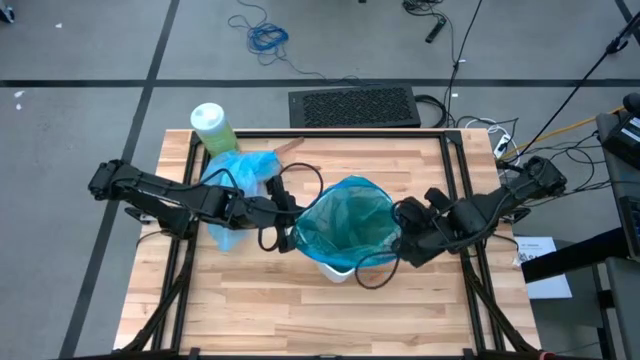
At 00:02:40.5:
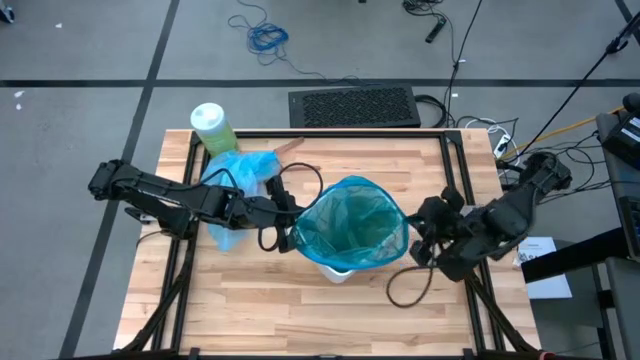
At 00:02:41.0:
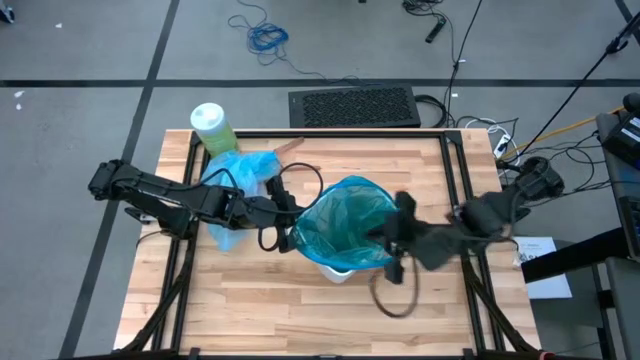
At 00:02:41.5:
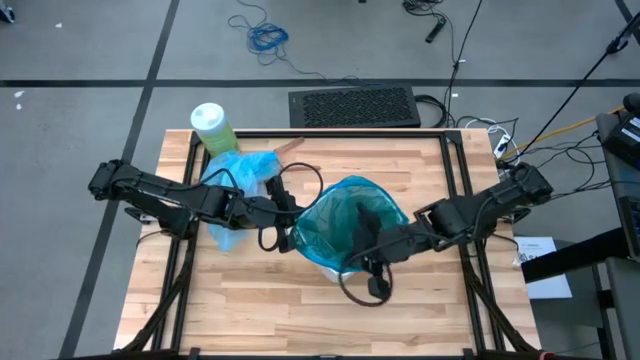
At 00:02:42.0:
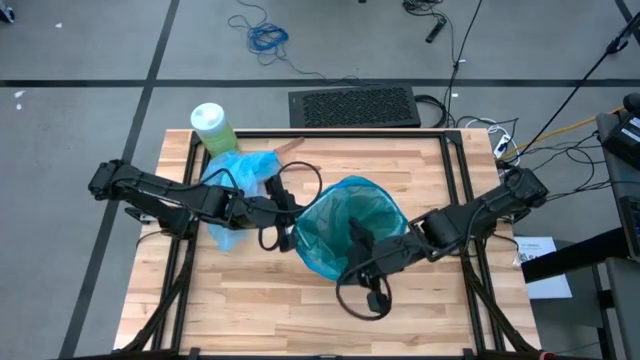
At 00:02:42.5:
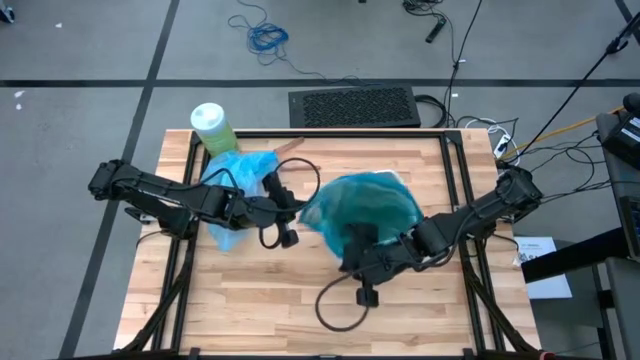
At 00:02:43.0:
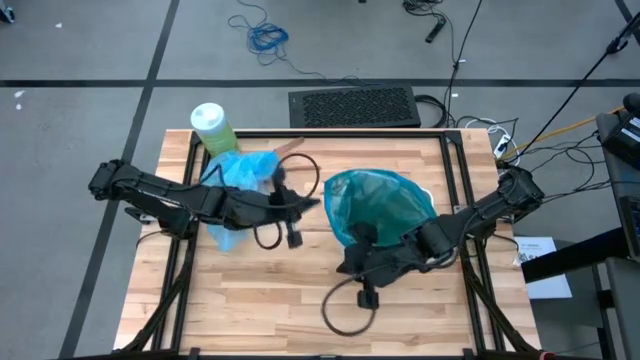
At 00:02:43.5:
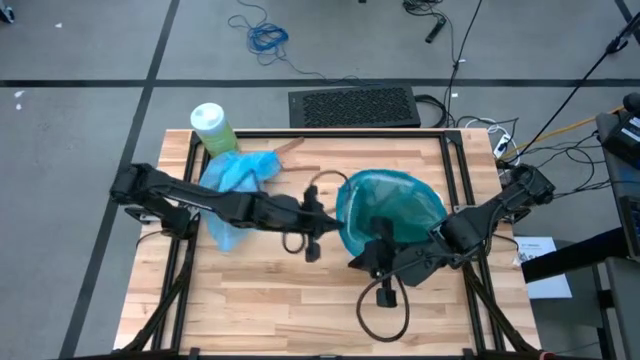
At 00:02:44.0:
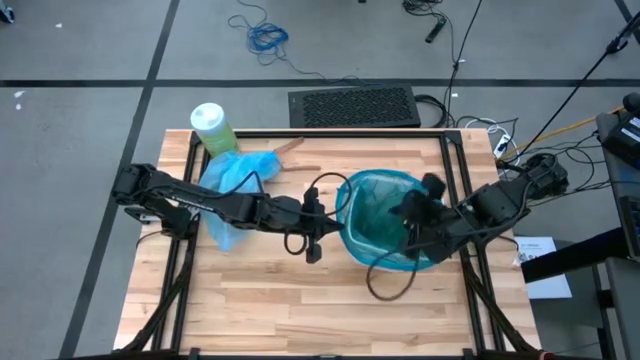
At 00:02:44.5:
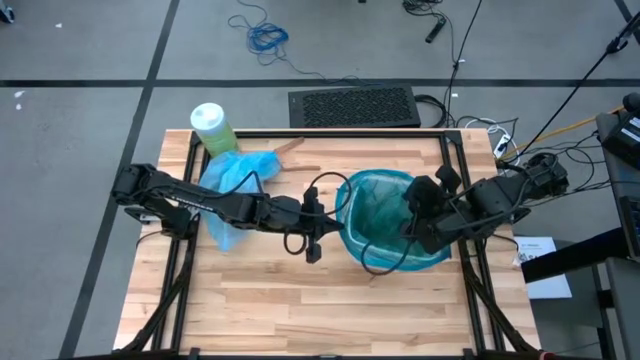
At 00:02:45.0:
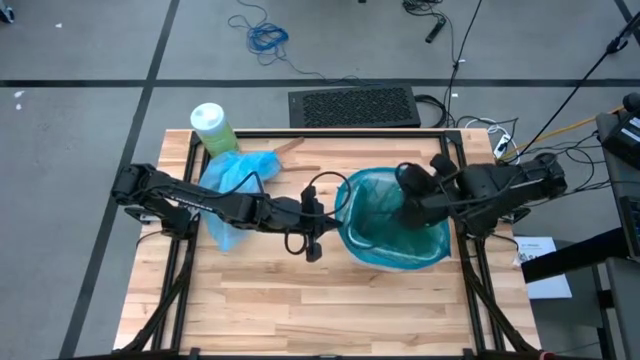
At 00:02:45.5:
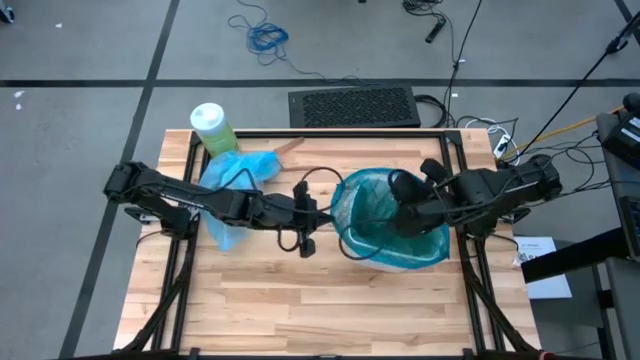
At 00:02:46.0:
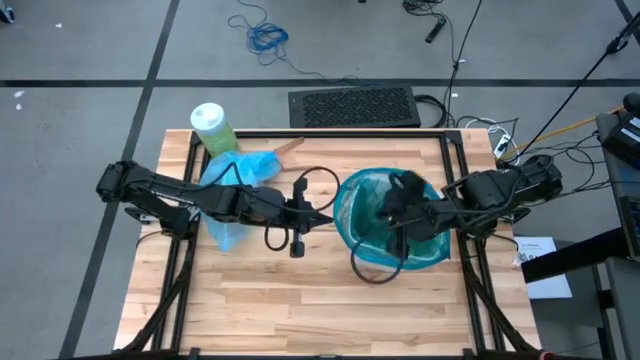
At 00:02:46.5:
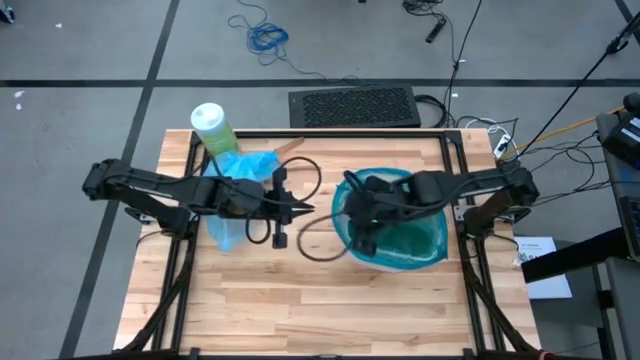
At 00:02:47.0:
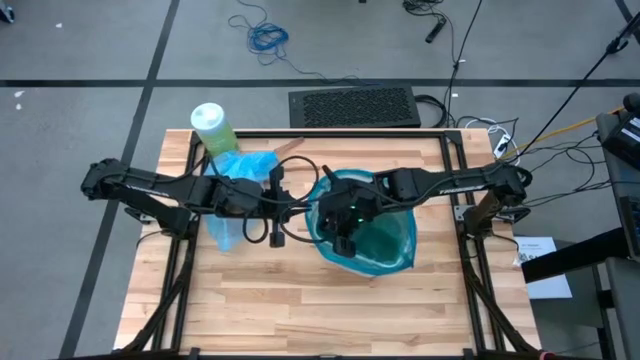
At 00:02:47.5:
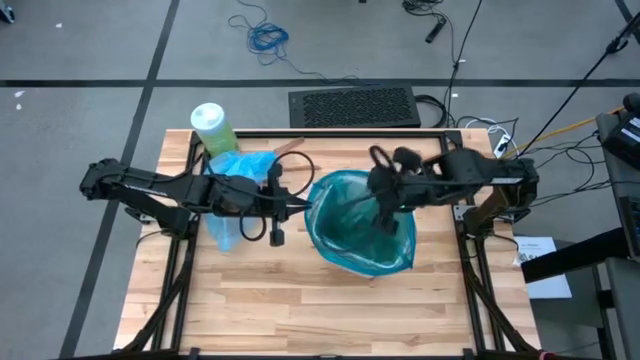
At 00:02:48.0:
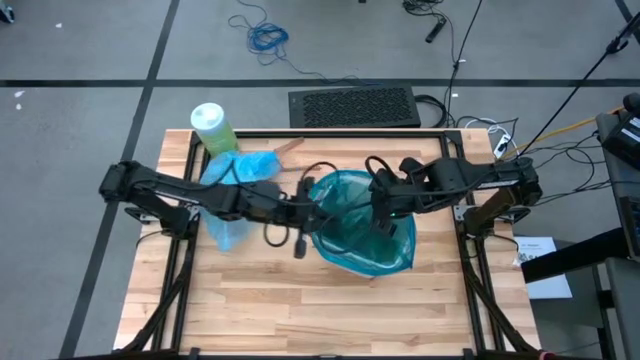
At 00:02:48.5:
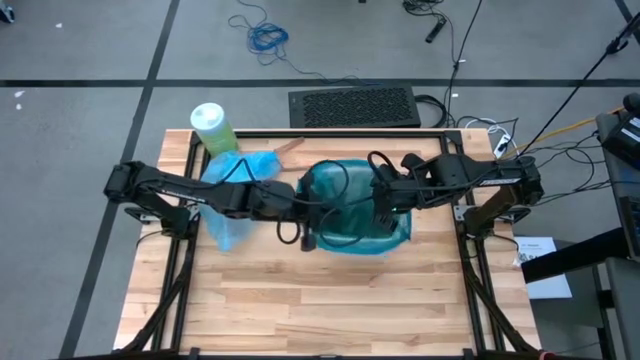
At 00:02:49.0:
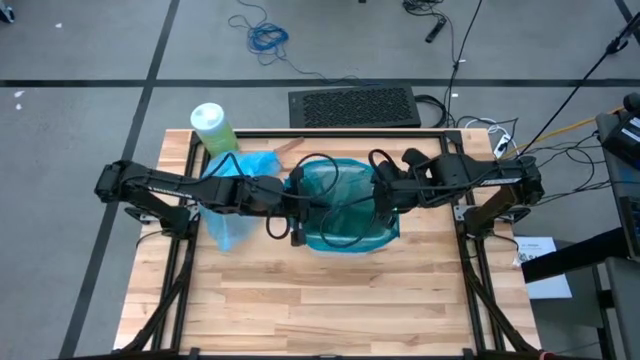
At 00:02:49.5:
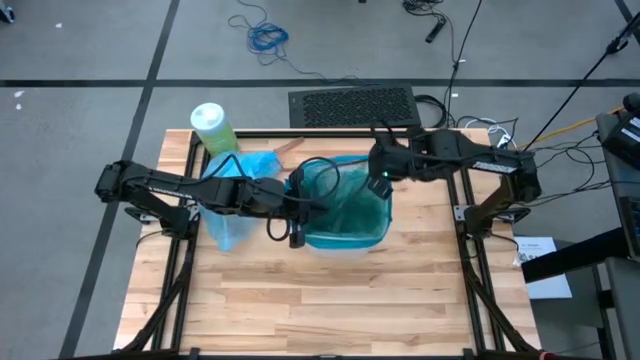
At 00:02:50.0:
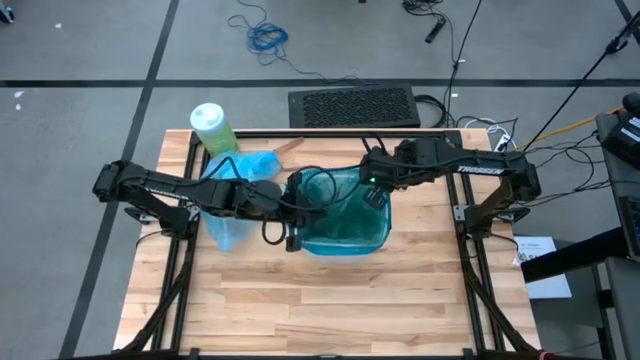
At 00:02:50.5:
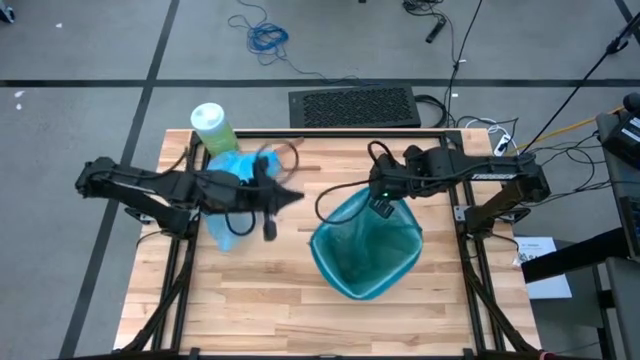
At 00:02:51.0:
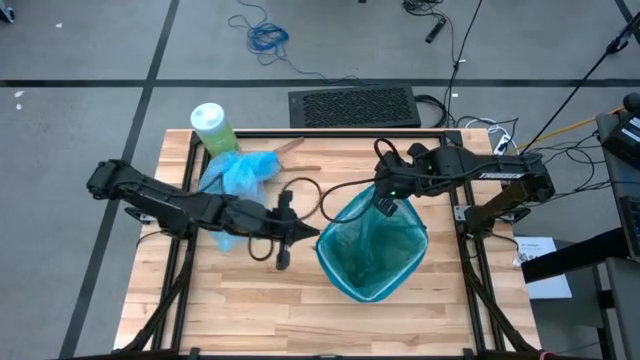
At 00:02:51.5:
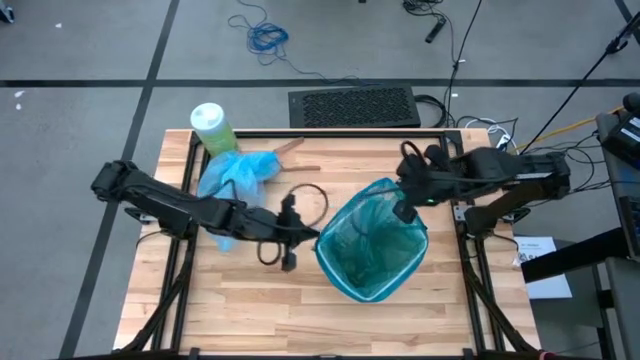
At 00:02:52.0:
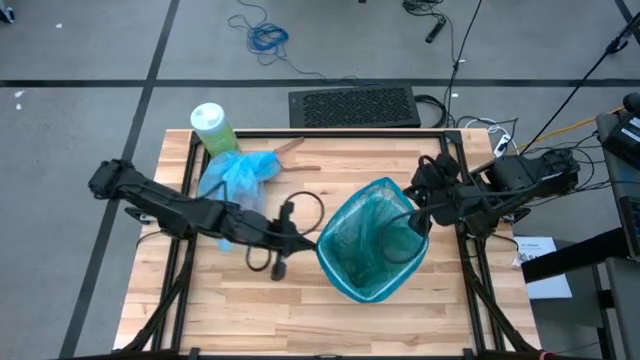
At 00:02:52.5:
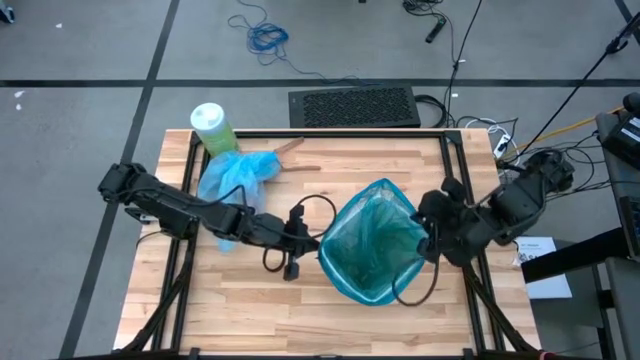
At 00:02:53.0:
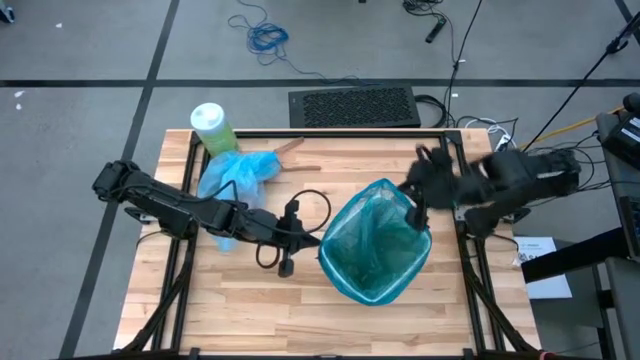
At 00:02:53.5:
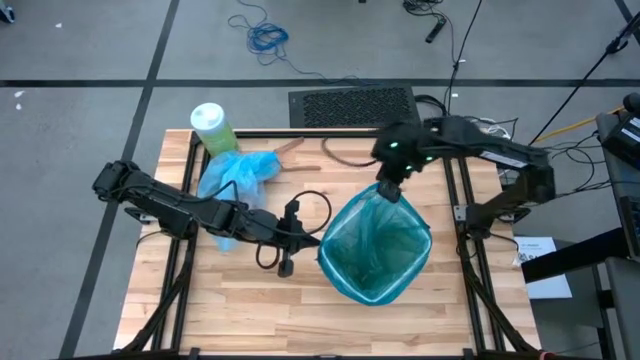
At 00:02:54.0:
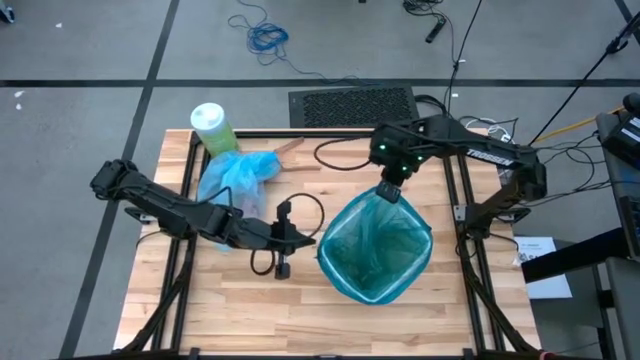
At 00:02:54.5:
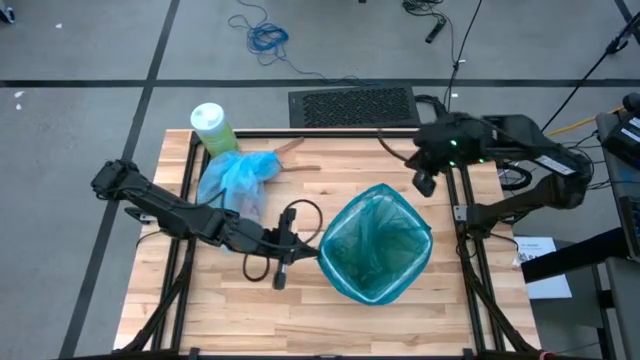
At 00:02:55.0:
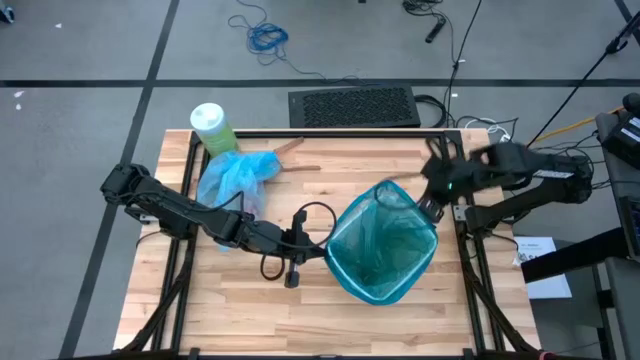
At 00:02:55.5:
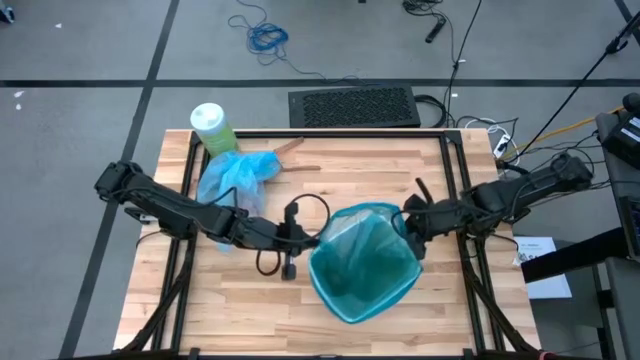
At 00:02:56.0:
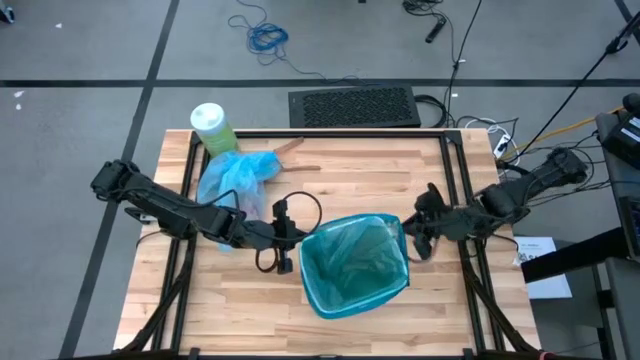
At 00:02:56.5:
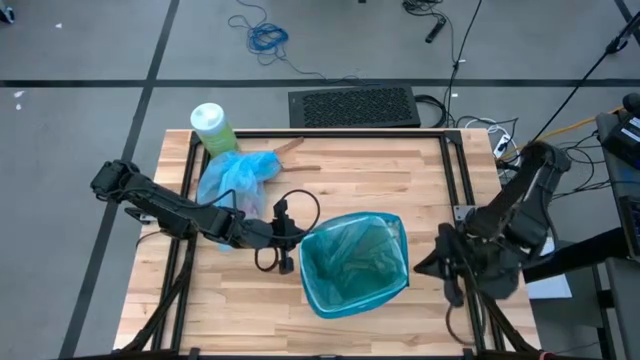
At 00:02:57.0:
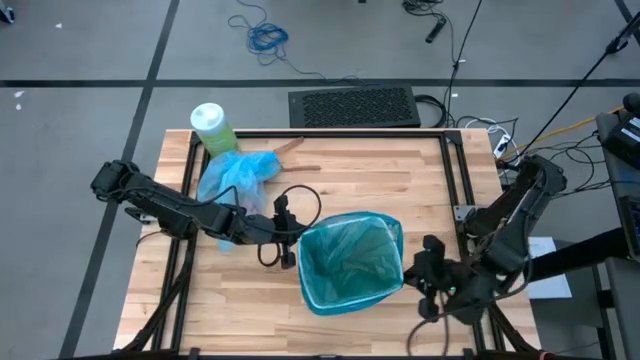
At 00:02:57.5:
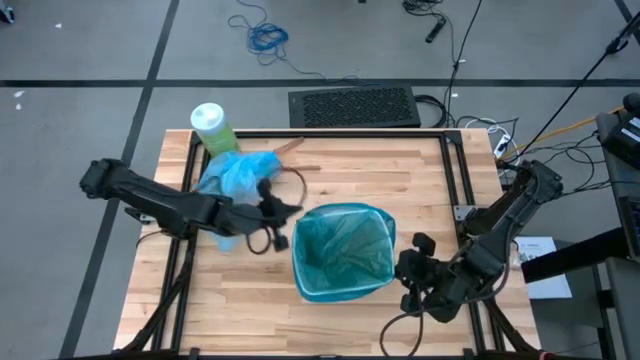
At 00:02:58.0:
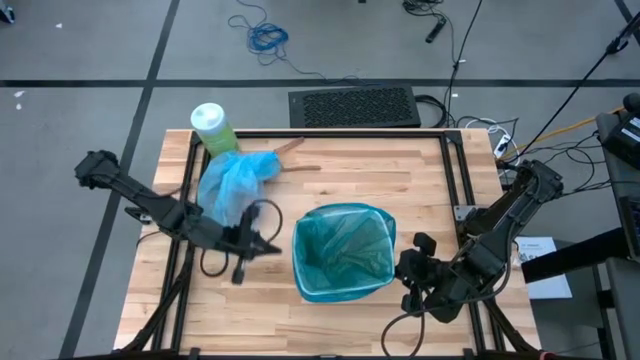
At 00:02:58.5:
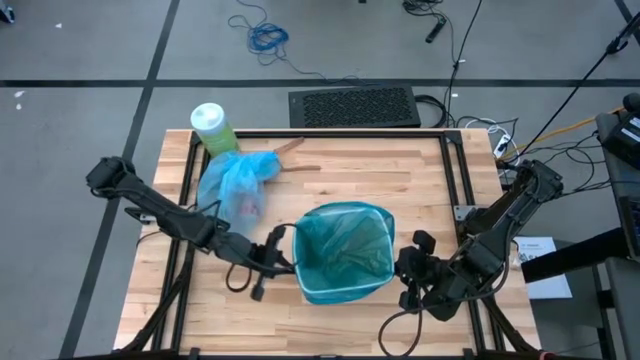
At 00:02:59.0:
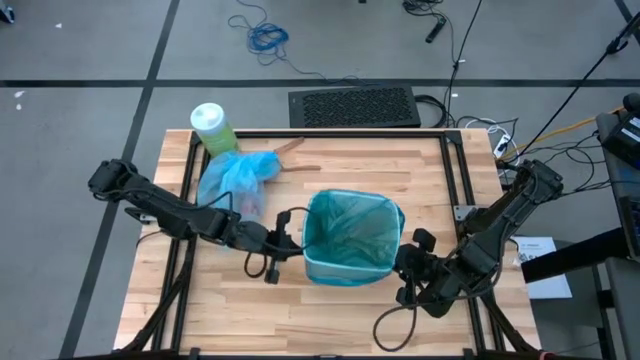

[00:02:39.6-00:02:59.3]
Task: place trash/remove bag and relplace
Insert the plastic bag in the white trash bin

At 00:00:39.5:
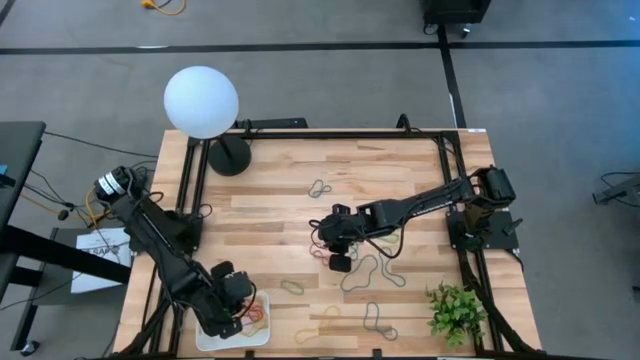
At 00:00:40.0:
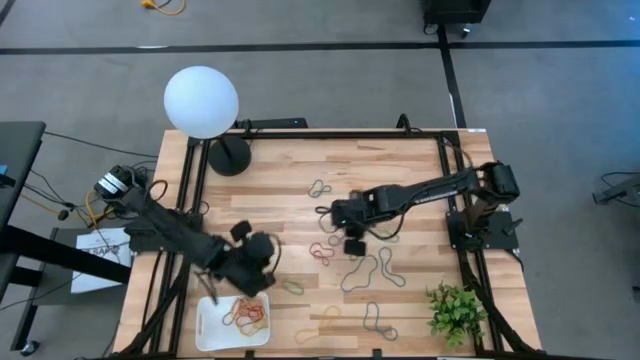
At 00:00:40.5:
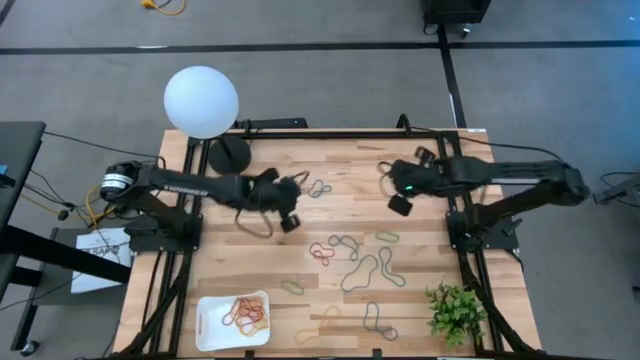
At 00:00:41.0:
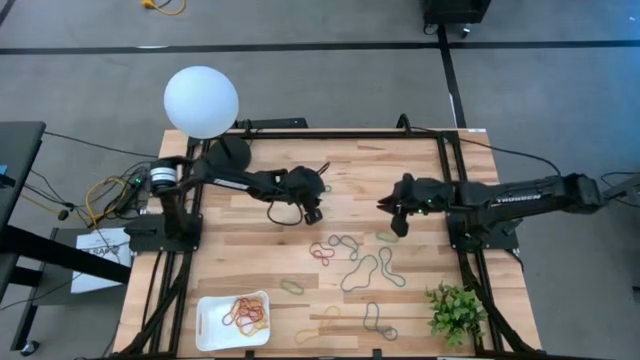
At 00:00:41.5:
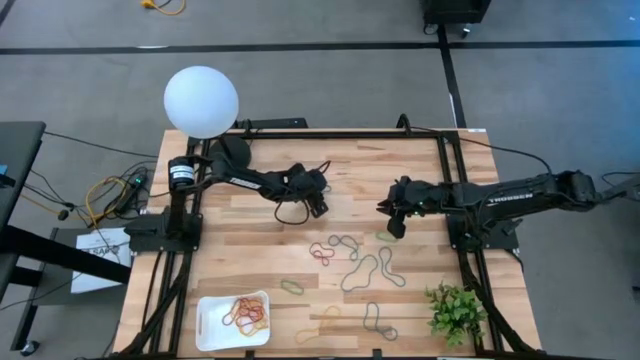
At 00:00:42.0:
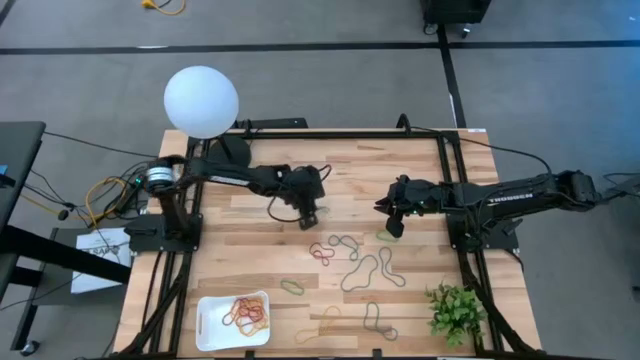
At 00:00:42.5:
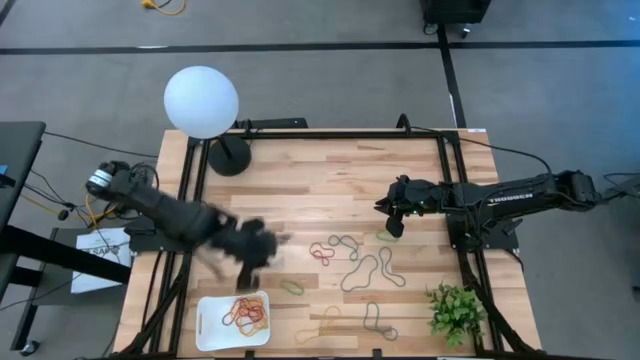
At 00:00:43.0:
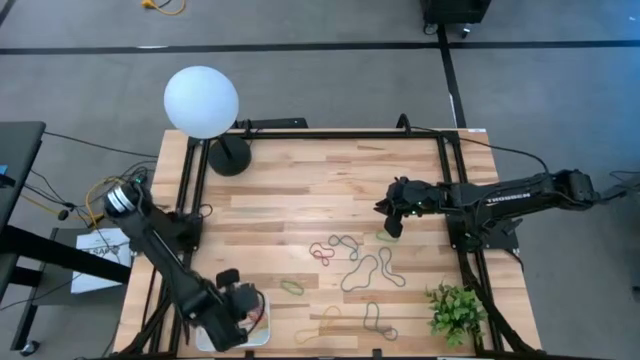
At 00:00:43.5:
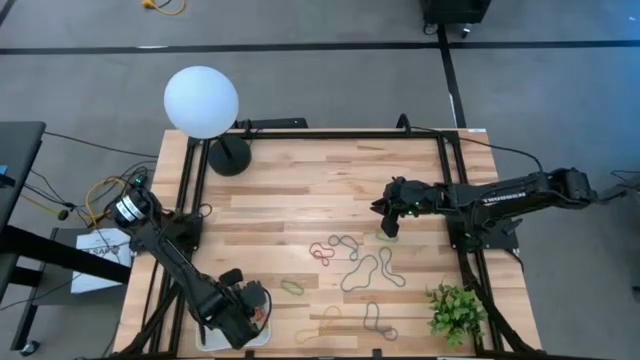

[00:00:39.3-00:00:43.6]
Task: Pick and place items into bin
Put the blue rubber band into the bin
